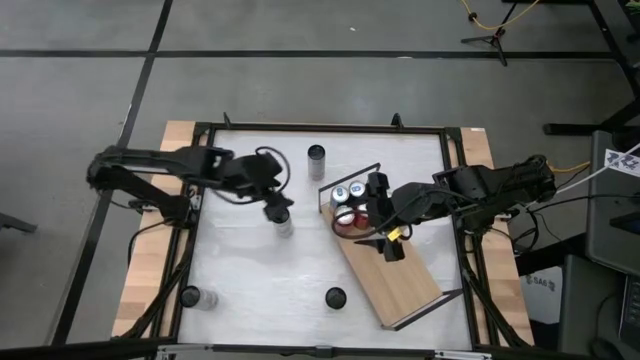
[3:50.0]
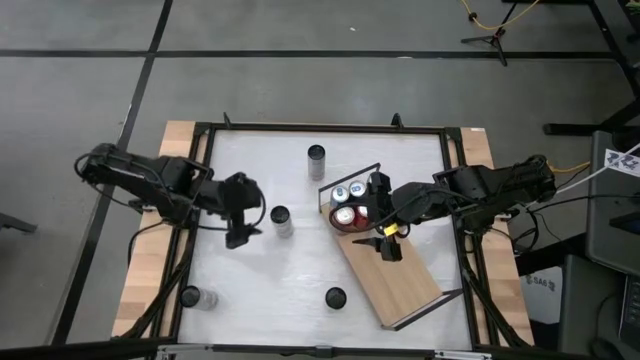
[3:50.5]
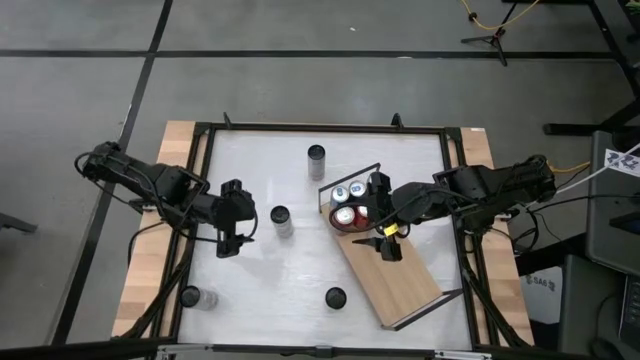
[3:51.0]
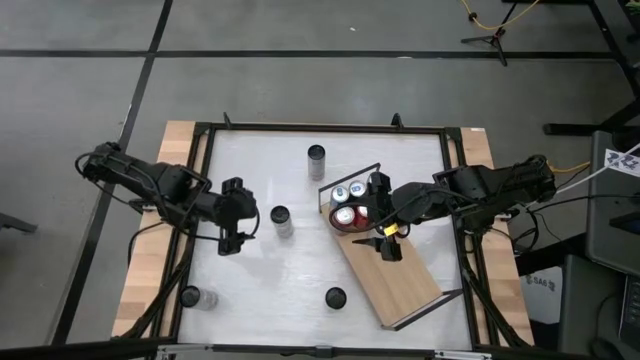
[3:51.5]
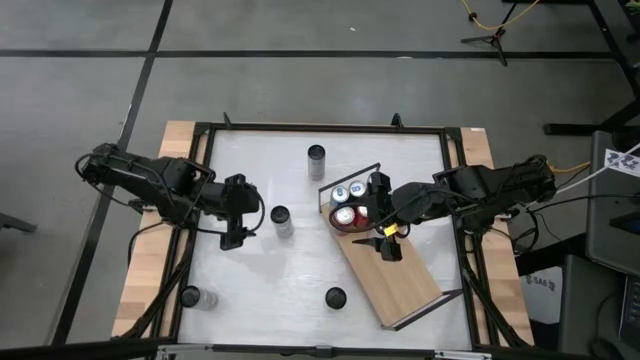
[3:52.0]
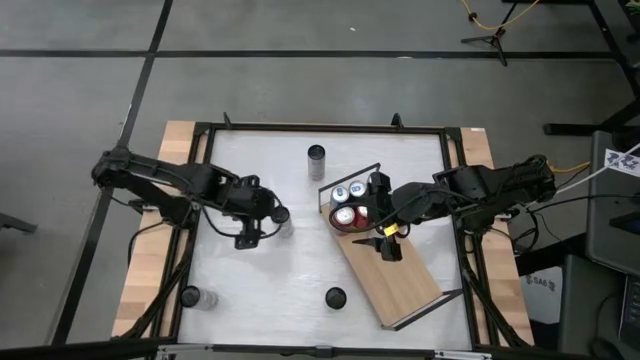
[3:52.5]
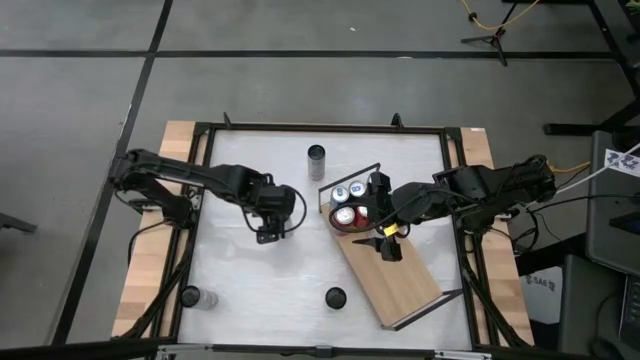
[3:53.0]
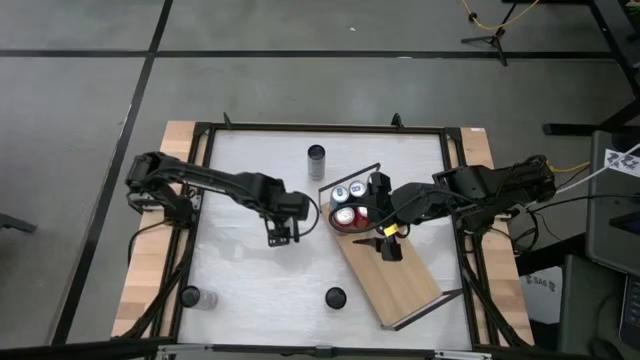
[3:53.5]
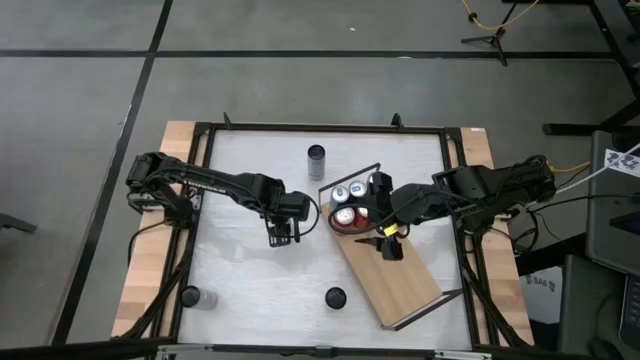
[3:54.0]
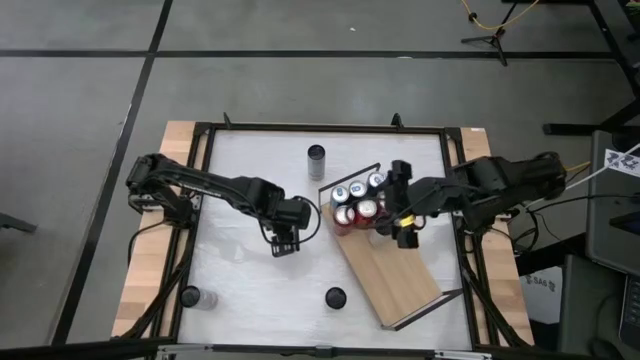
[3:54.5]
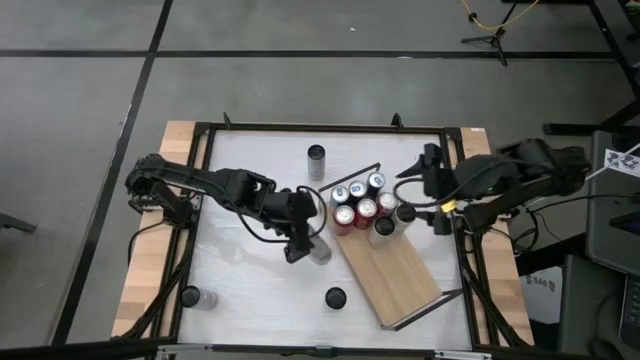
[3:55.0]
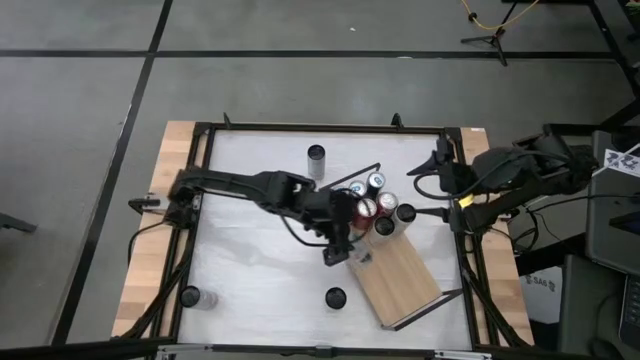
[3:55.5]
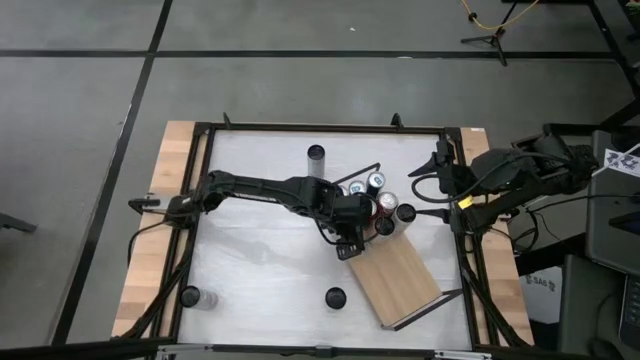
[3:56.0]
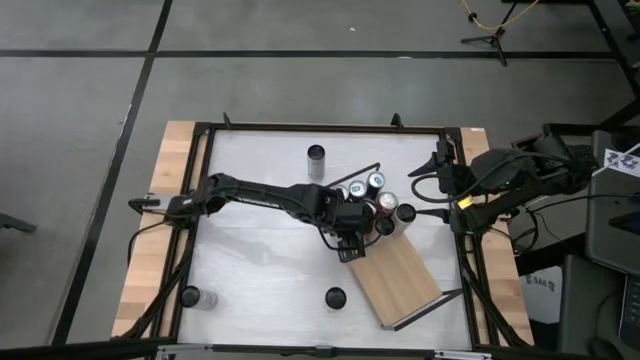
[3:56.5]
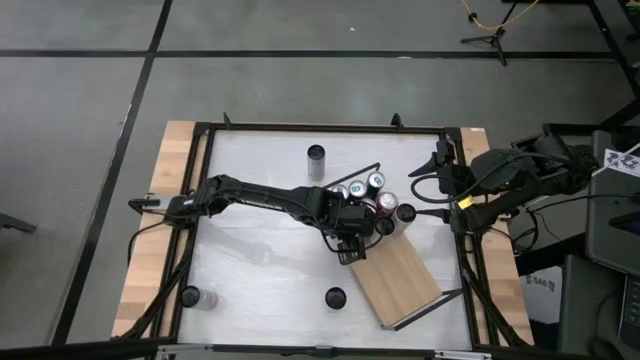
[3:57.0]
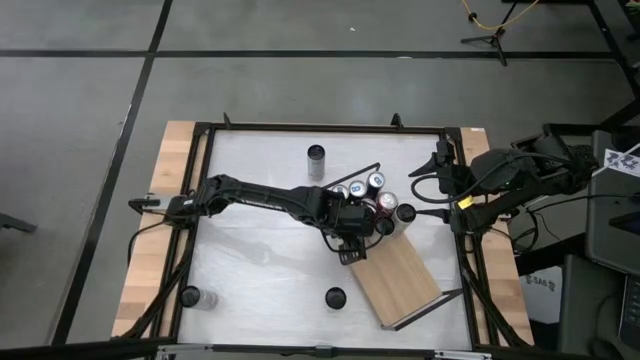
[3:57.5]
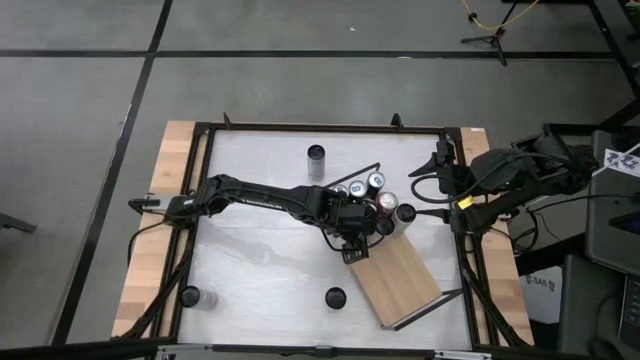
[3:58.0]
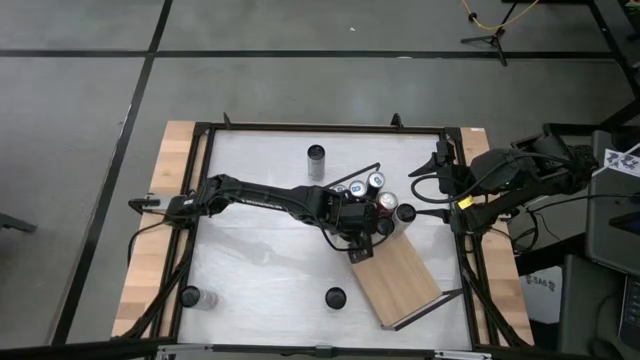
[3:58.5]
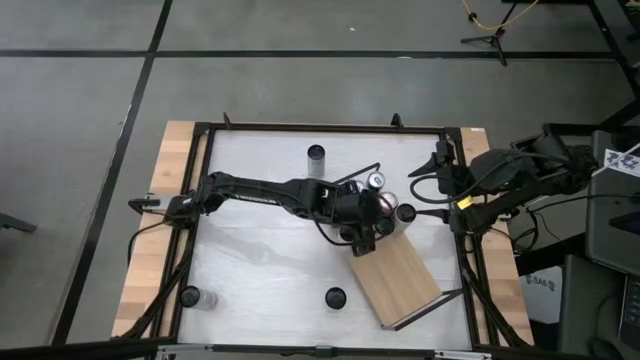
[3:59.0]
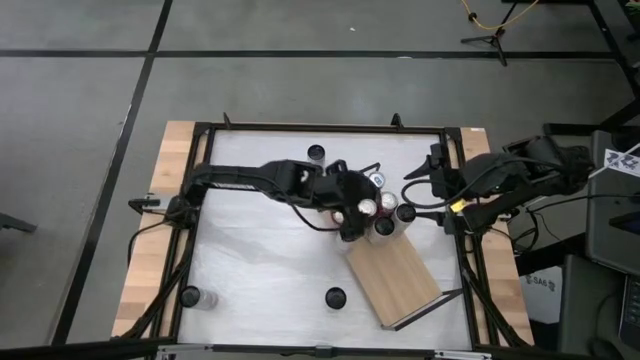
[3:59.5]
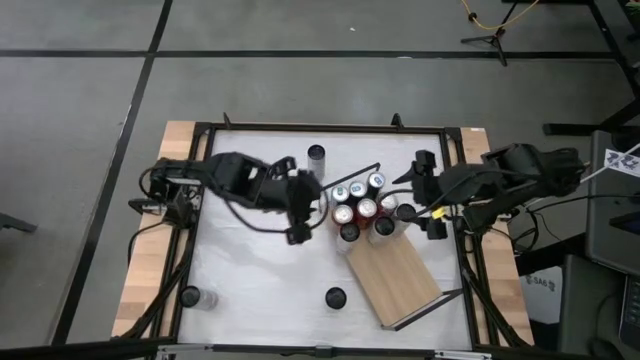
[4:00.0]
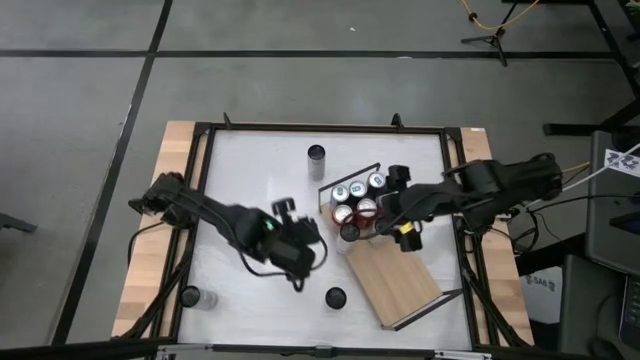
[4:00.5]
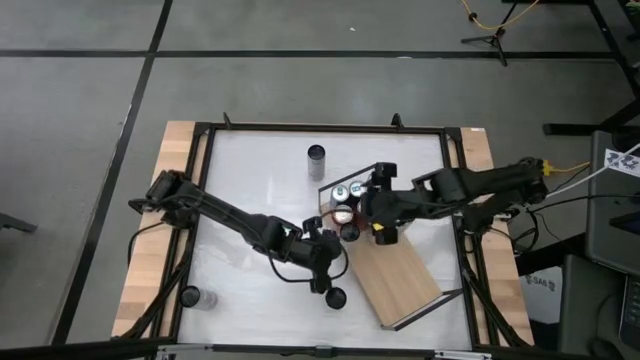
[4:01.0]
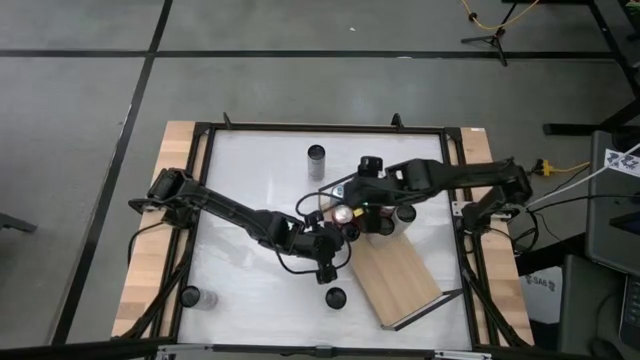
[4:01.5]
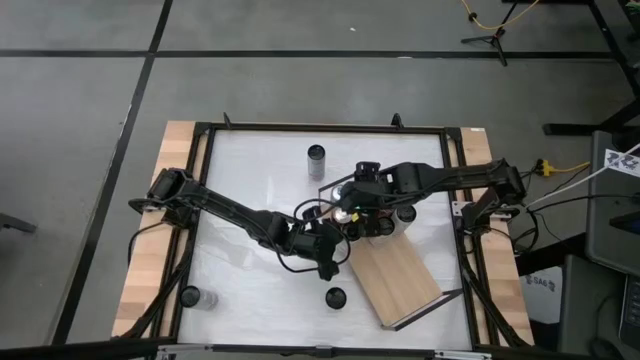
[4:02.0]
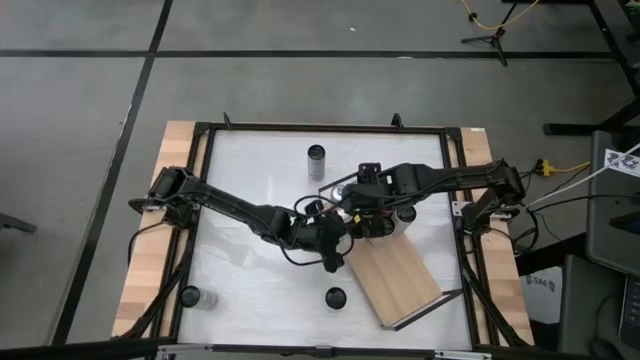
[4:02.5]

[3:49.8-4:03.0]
Task: Place canned beverage on shelf
Put the white pink soda can on the shelf aligned with the other white pink soda cans

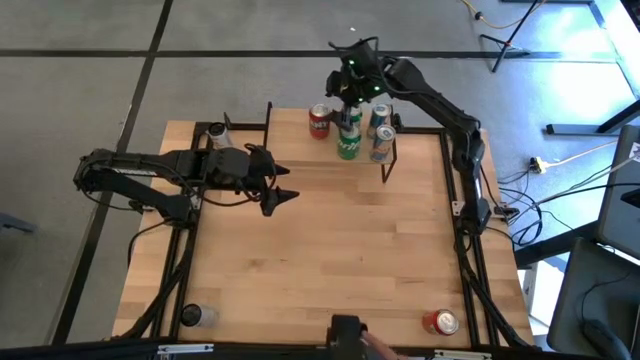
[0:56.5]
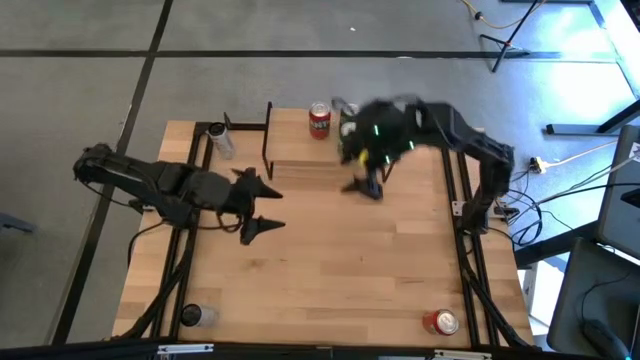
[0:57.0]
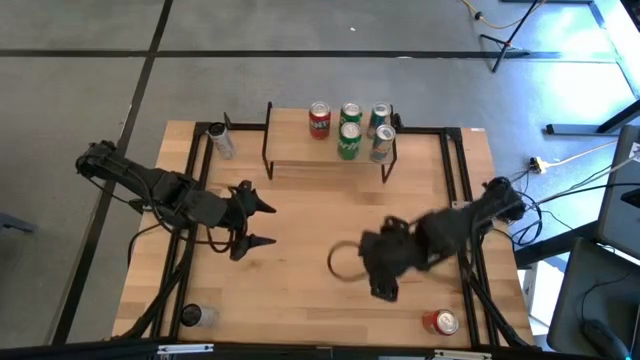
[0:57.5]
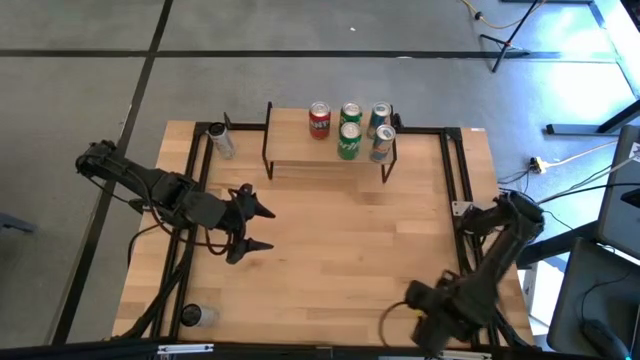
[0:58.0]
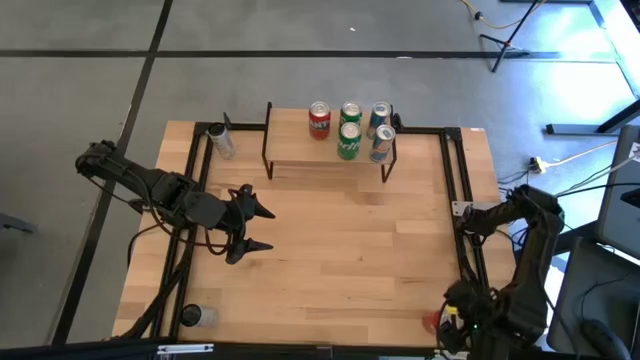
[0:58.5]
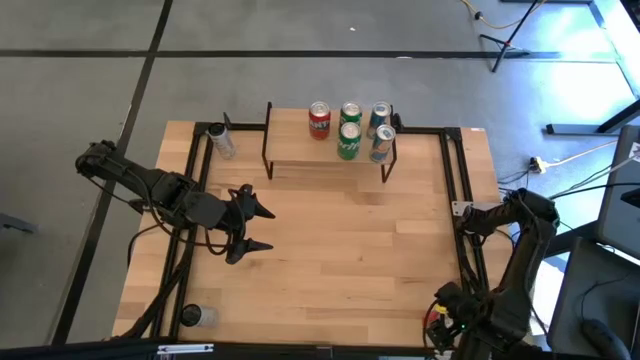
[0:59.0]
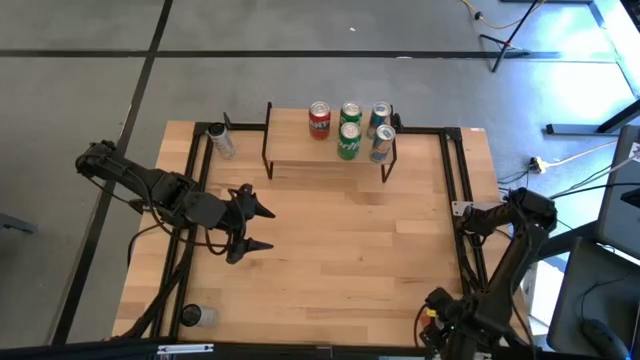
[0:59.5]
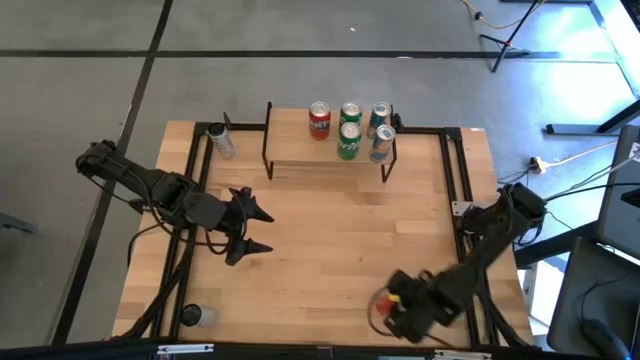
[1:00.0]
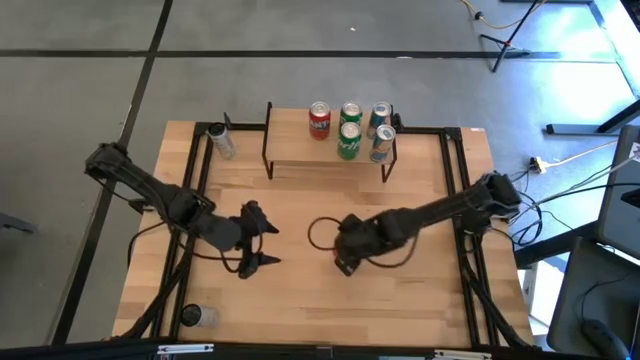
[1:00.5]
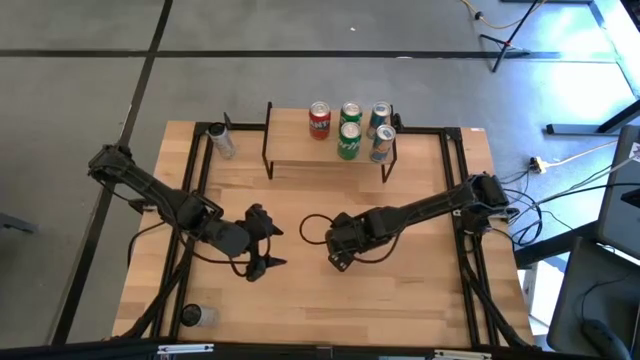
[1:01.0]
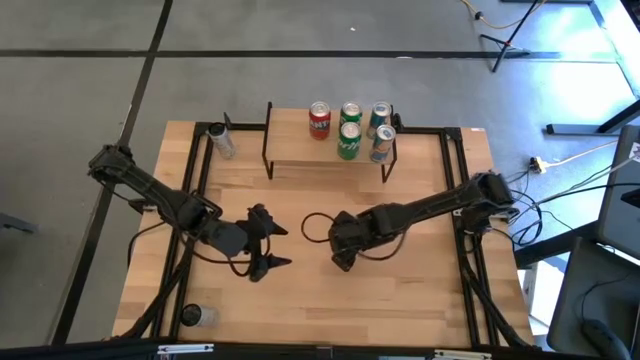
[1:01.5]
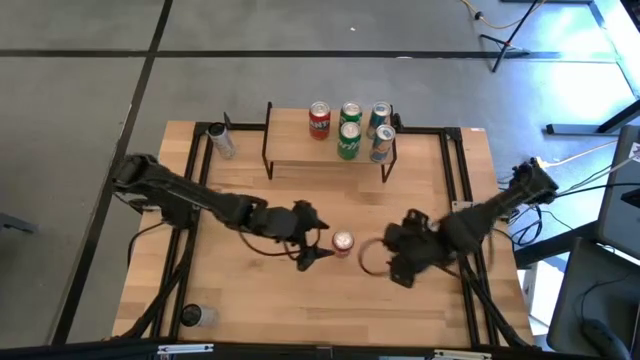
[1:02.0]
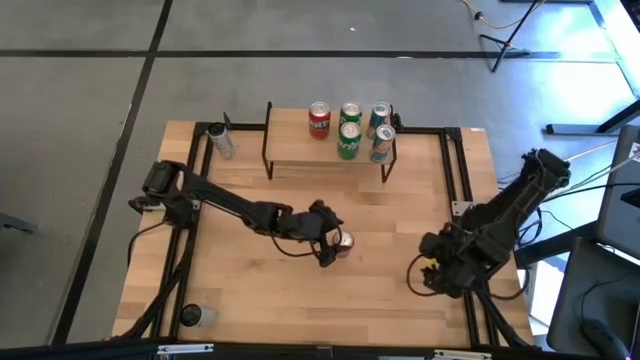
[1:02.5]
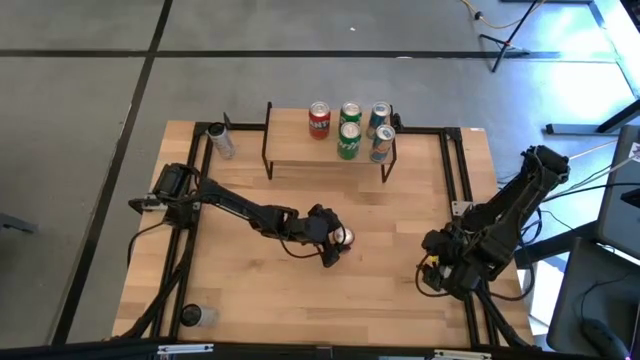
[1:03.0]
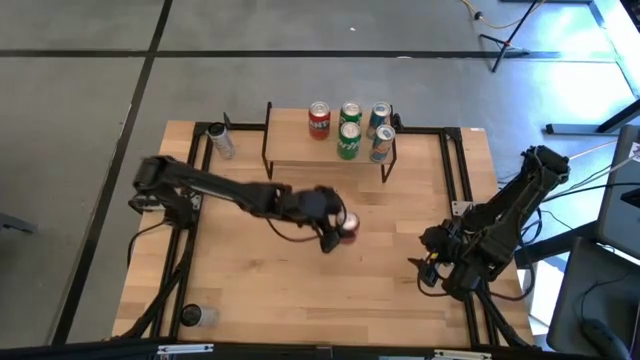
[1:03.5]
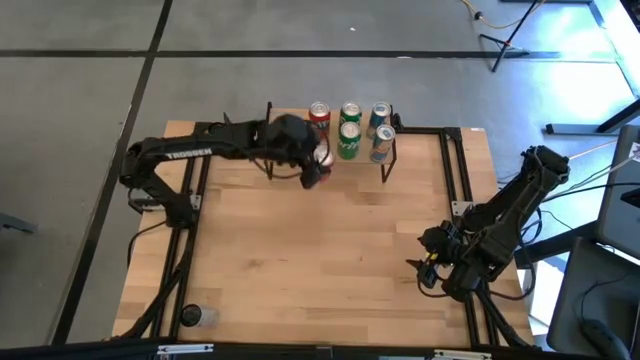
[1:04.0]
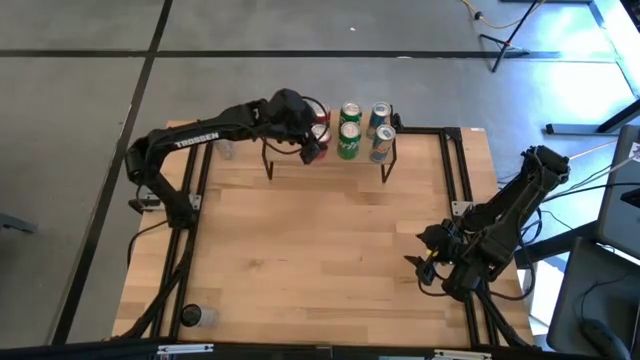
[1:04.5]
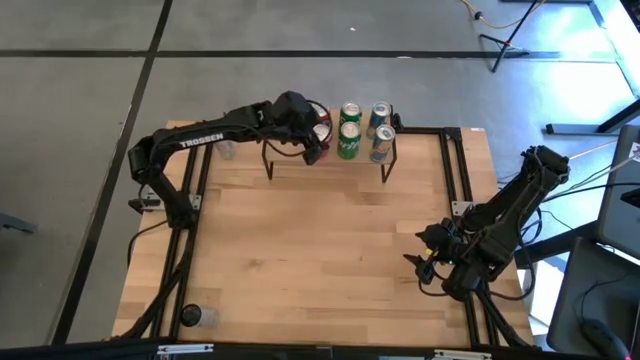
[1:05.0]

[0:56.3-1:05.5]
Task: Place canned beverage on shelf
Put the red soda can on the shelf aligned with the other red soda can
